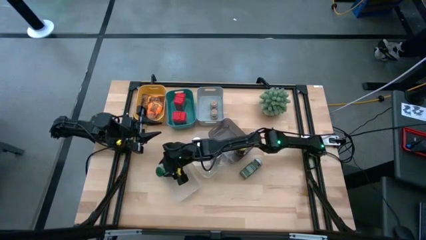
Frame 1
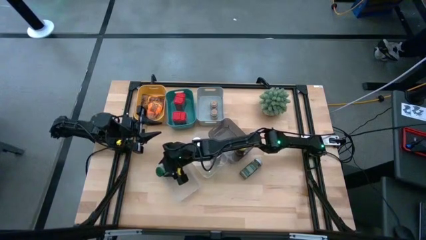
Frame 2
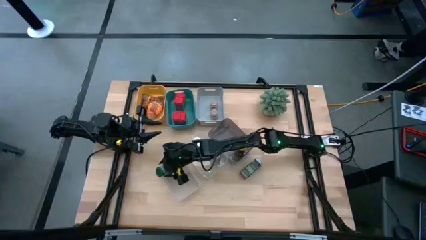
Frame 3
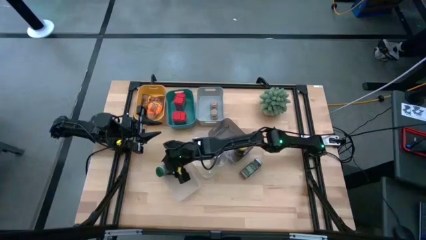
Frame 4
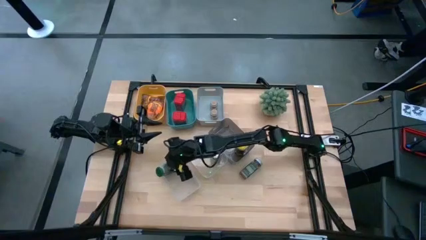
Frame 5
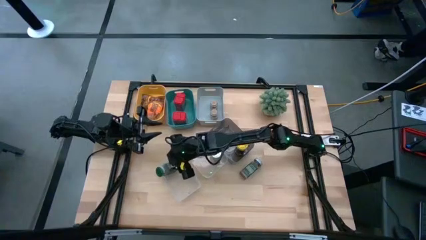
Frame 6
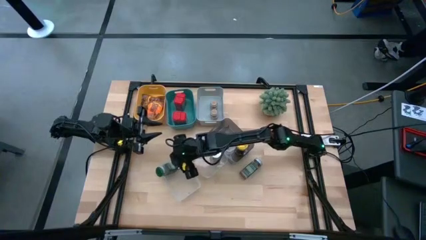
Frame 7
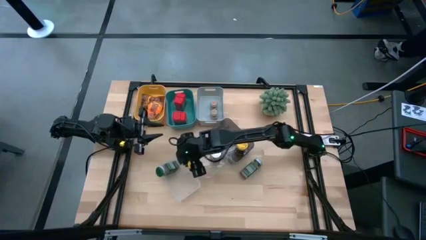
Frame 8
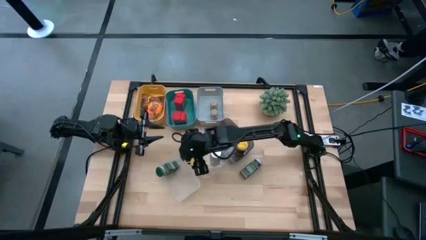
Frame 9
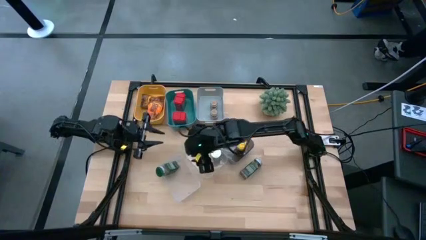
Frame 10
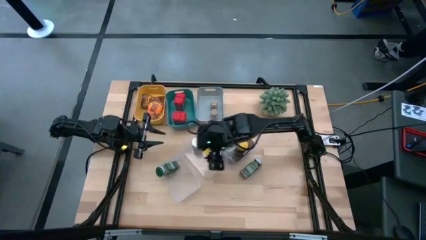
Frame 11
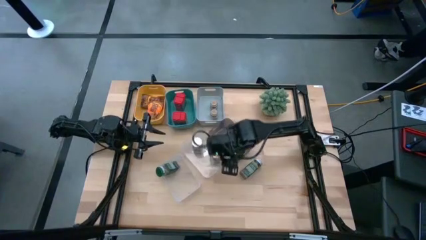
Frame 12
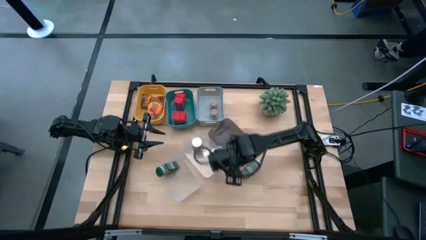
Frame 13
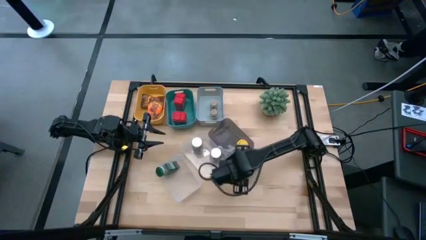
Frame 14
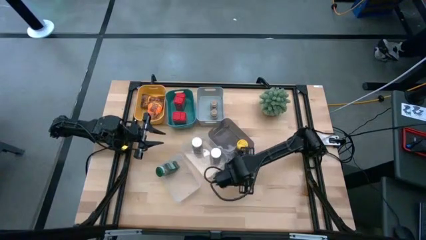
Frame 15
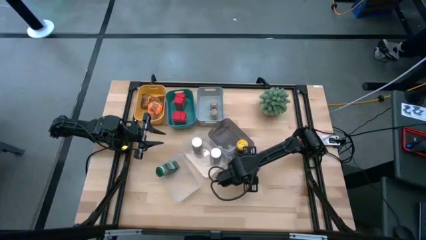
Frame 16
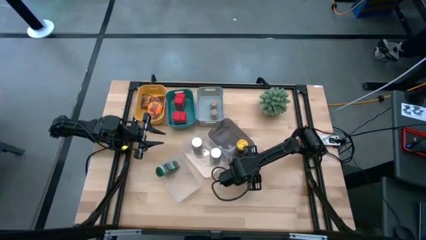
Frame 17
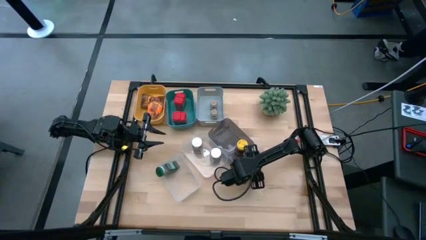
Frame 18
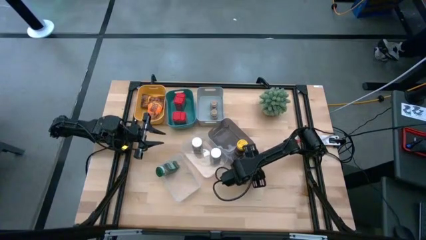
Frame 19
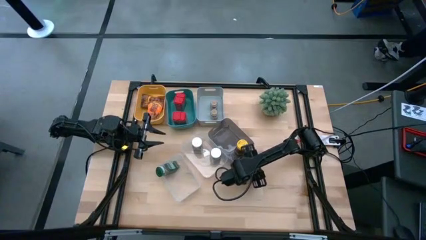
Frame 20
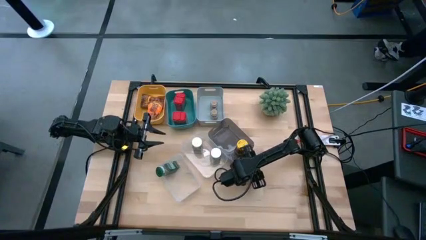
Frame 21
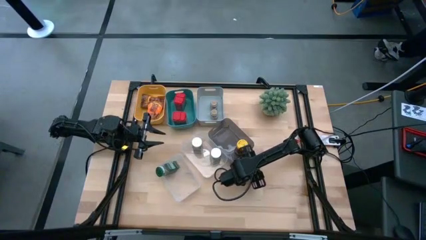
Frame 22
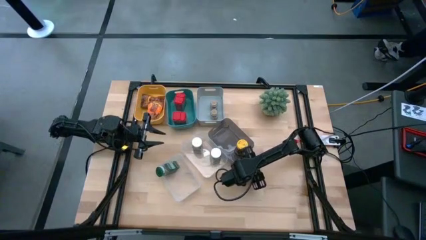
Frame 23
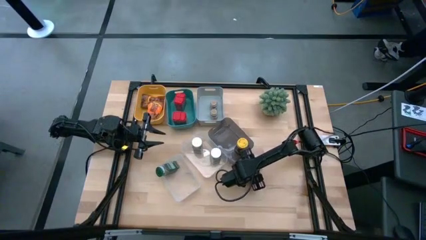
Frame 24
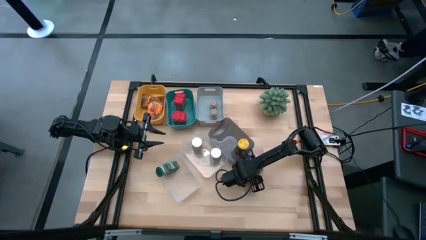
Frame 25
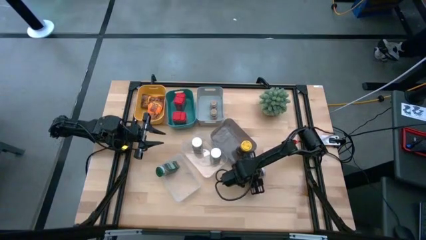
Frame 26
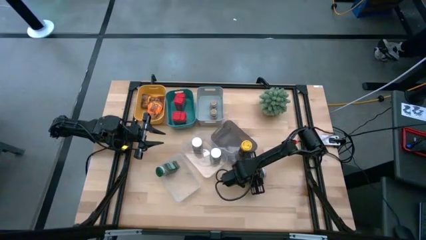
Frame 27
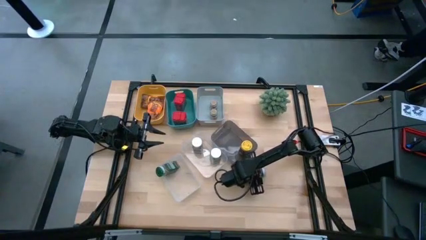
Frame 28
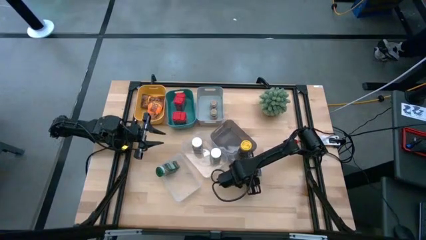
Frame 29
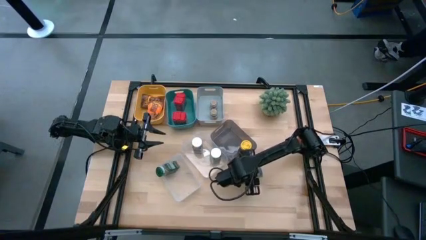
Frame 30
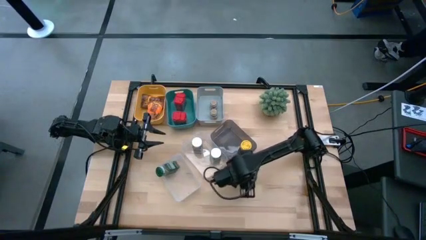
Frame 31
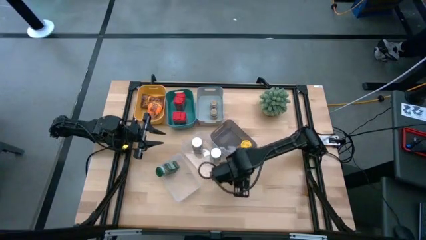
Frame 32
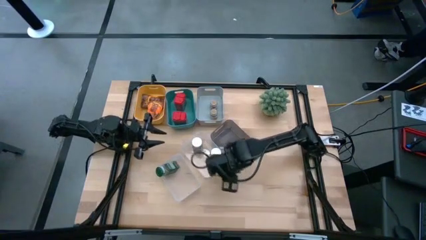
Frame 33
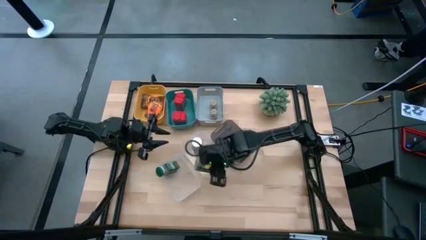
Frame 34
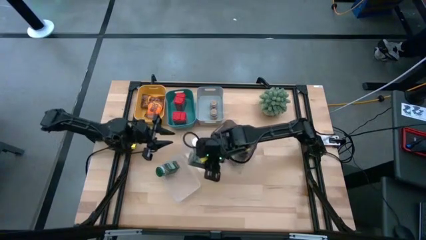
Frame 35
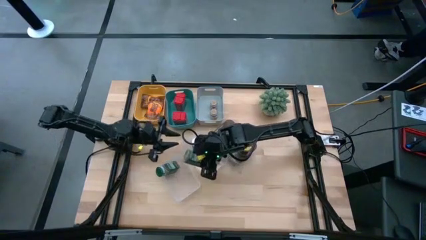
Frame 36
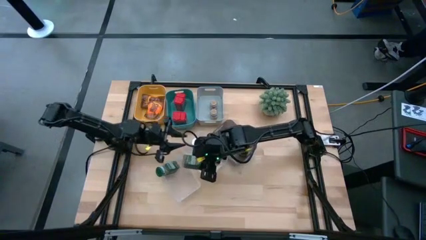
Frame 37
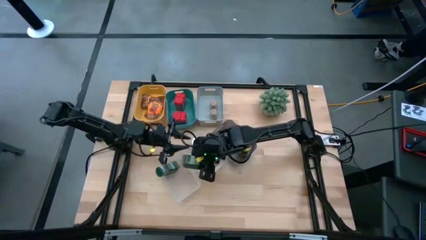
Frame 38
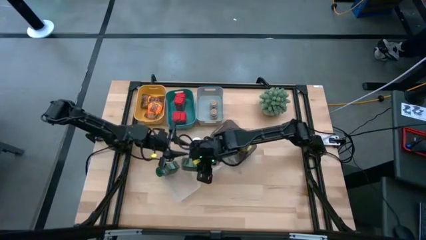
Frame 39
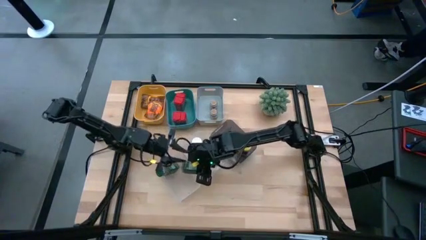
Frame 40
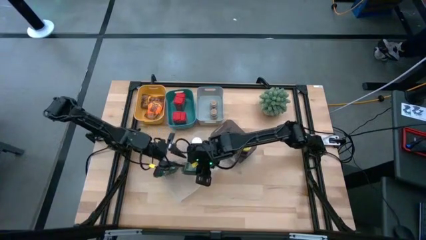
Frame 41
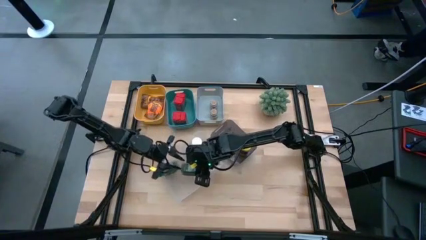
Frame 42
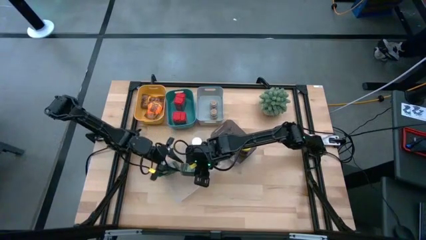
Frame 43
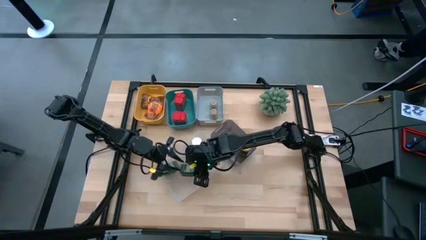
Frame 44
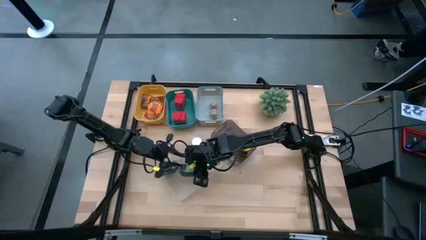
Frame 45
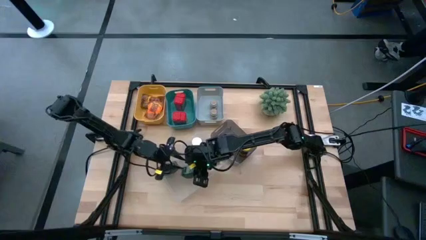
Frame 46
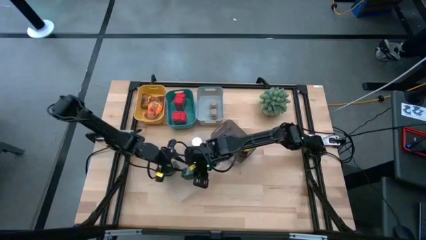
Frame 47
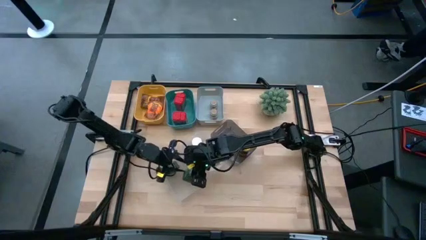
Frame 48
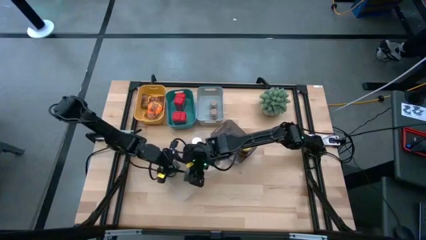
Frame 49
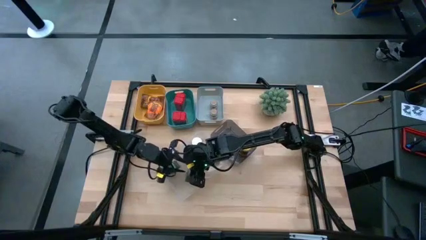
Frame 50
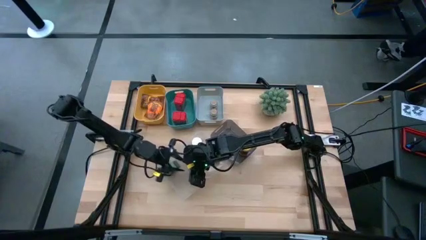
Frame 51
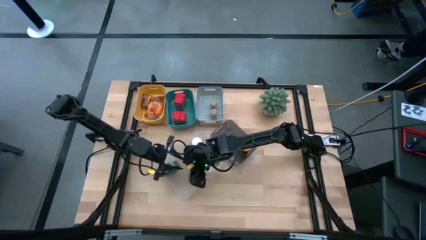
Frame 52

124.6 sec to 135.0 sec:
Task: Sort spices by type
Put the green seasoning bottle into the bottom transparent bin

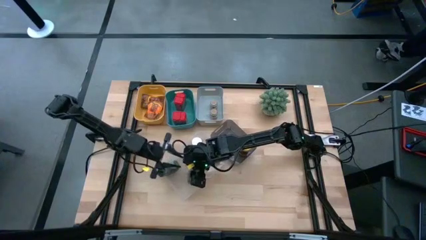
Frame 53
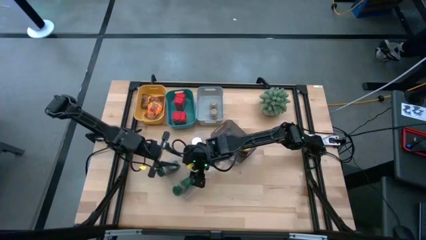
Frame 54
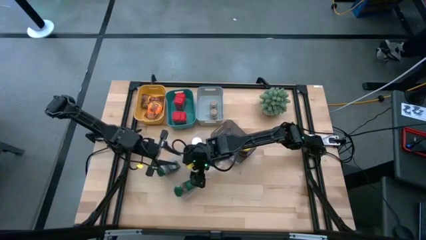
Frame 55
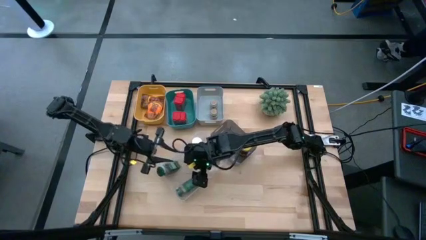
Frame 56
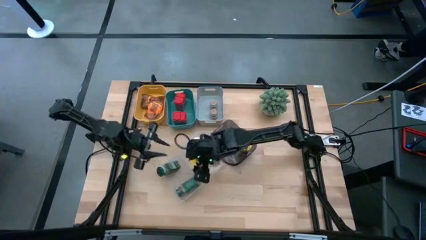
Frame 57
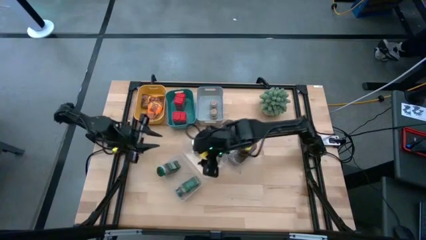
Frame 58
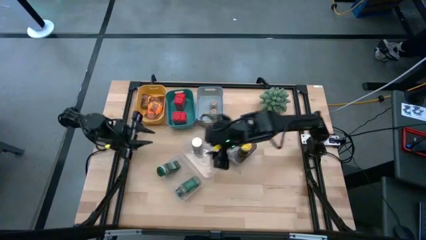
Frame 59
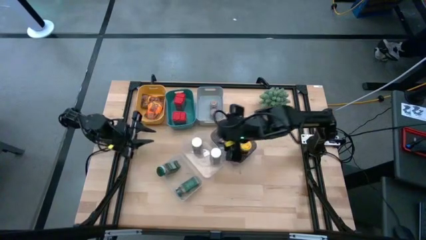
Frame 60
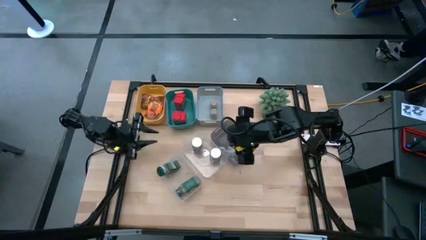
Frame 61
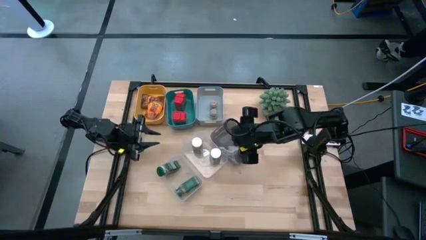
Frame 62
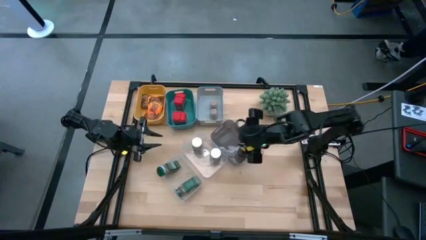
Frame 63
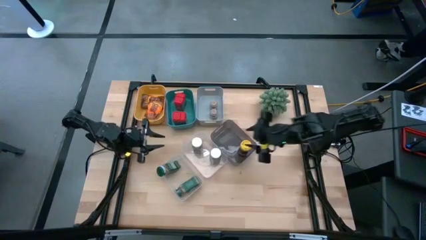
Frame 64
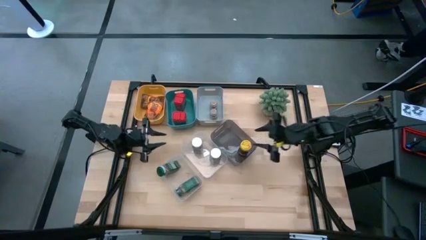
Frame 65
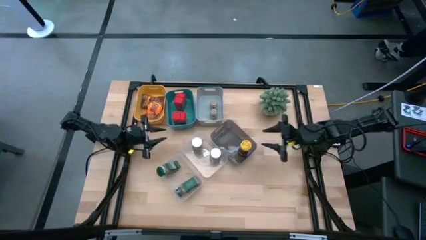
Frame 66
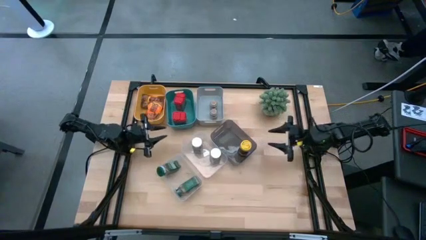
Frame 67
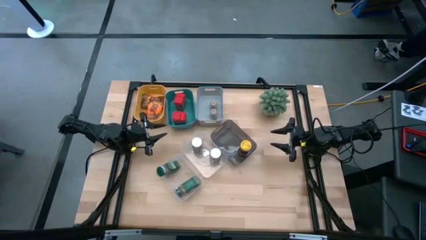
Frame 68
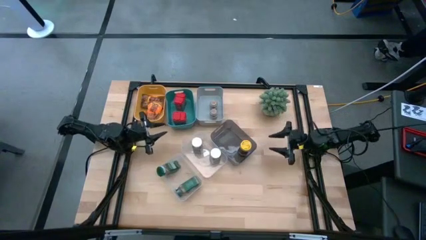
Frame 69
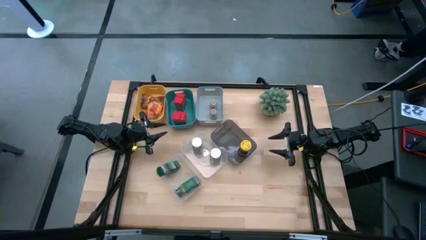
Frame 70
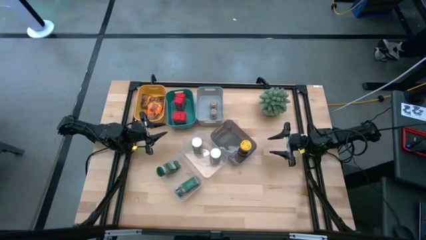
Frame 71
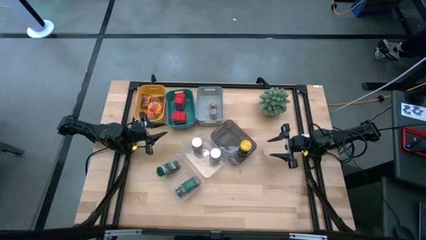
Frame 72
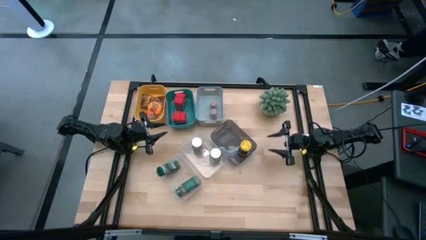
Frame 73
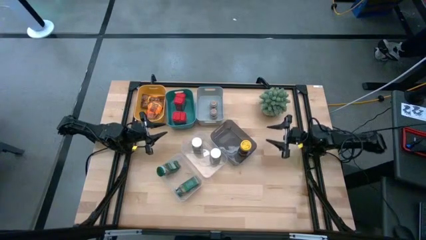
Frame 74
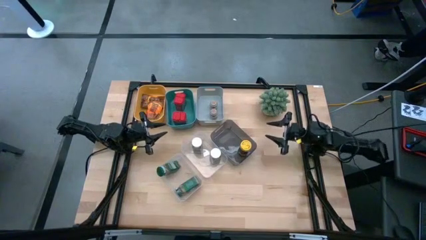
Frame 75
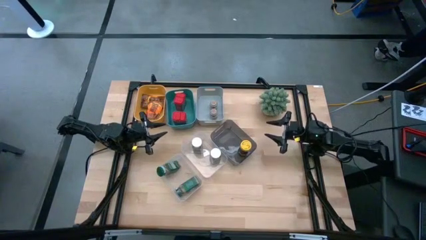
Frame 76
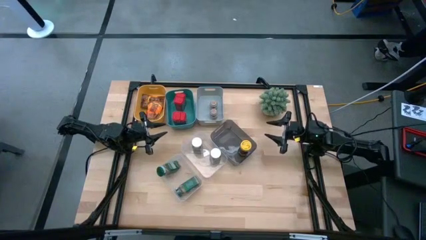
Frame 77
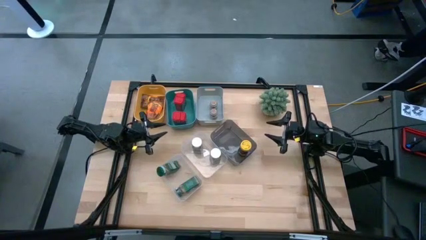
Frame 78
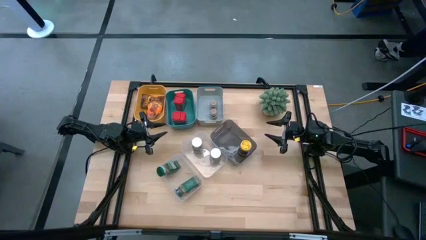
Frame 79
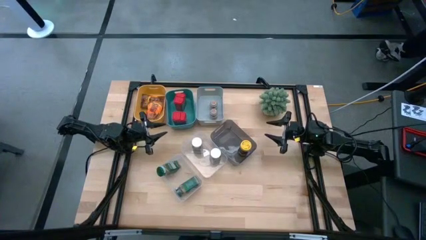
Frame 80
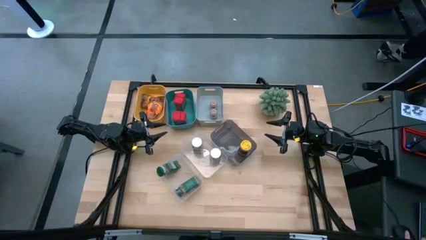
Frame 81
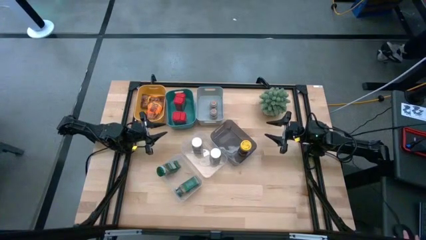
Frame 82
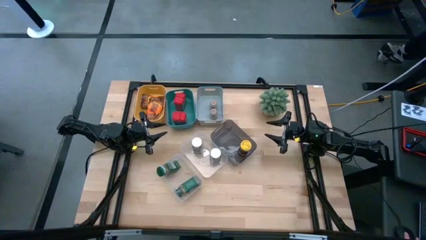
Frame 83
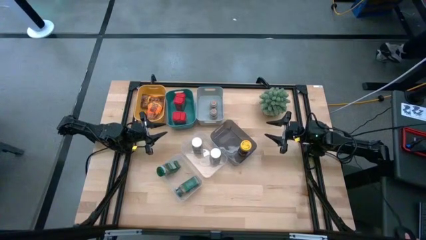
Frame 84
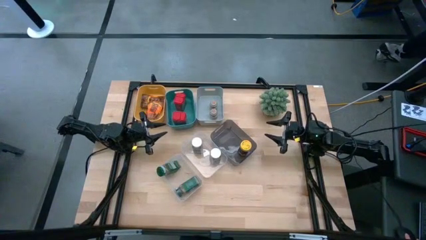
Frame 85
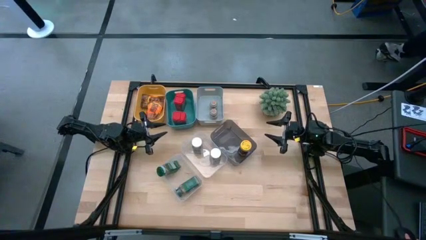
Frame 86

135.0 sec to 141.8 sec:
Return to Home Position
